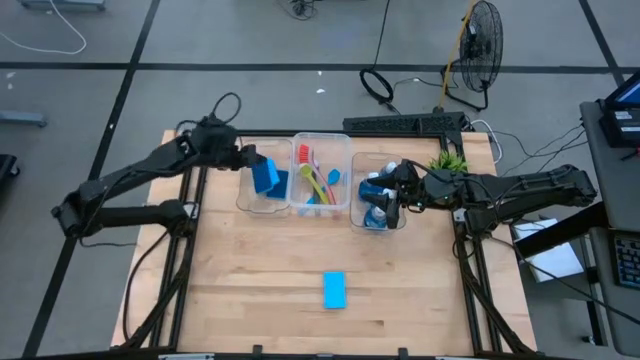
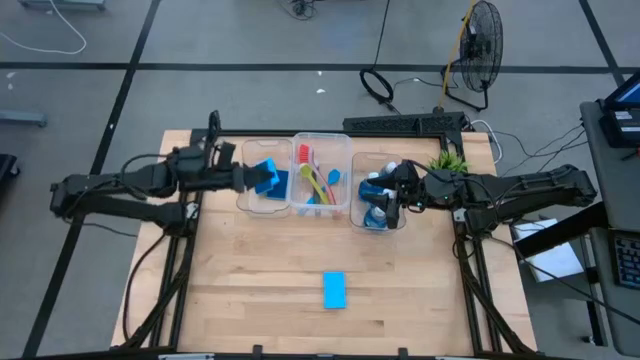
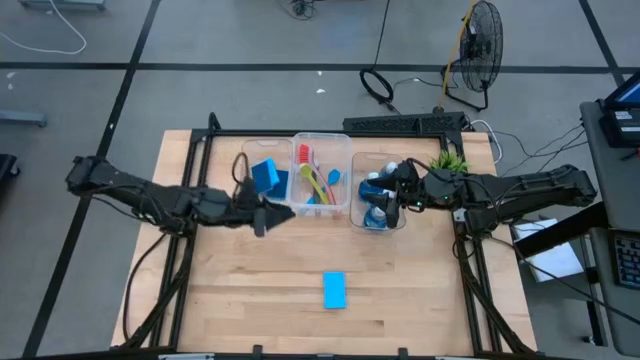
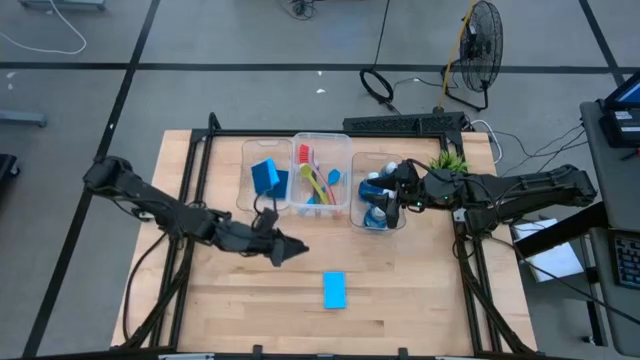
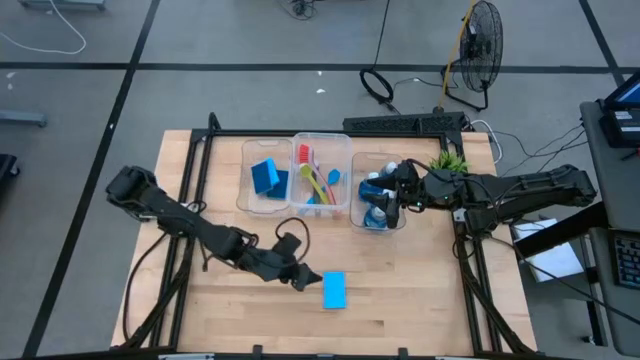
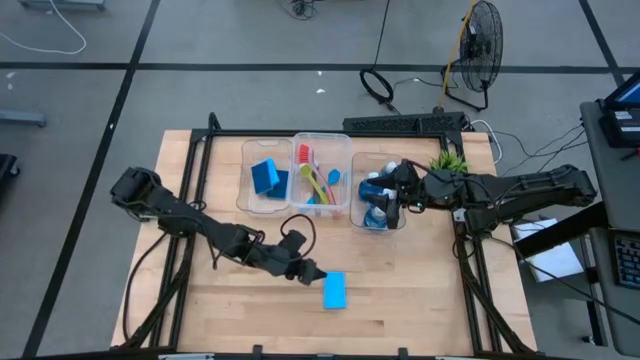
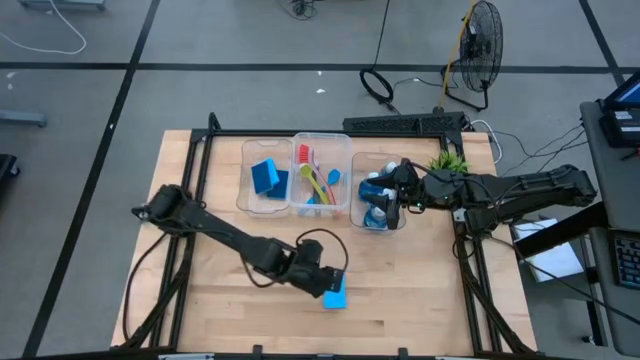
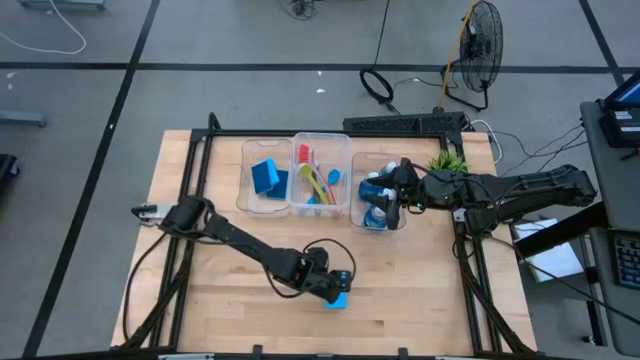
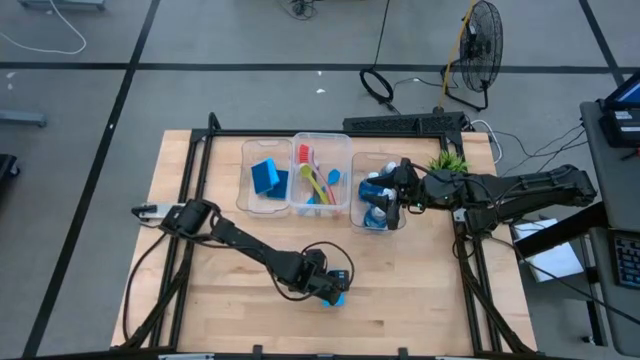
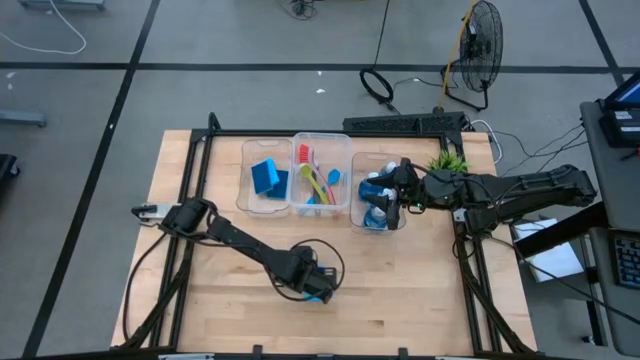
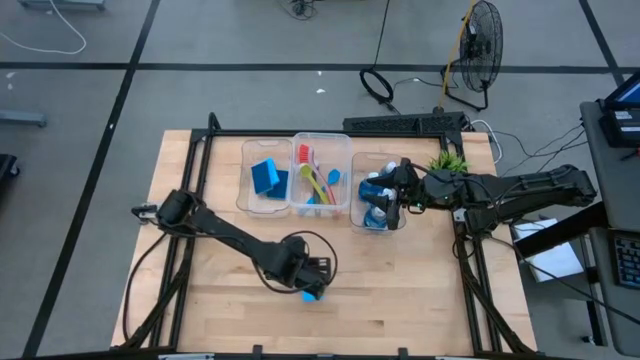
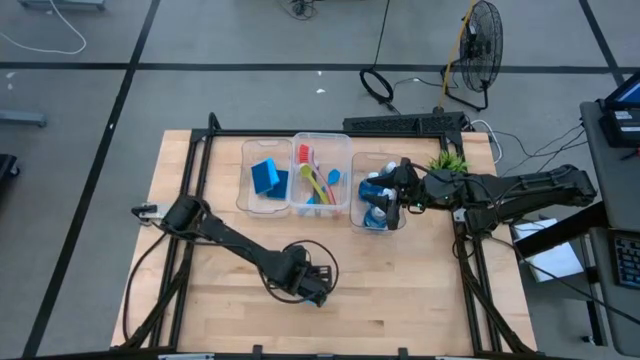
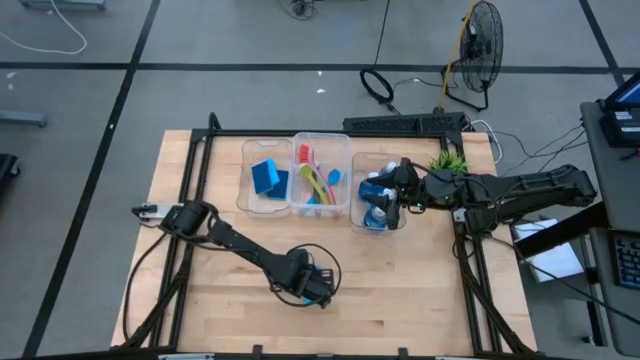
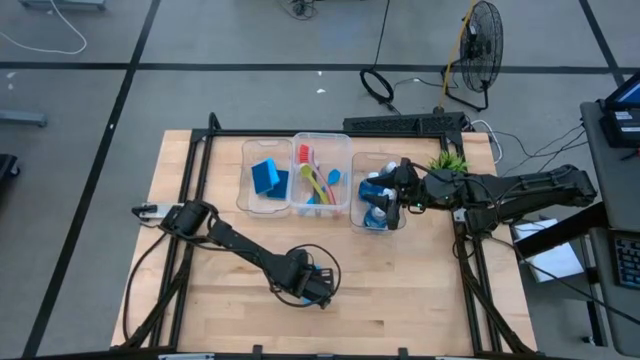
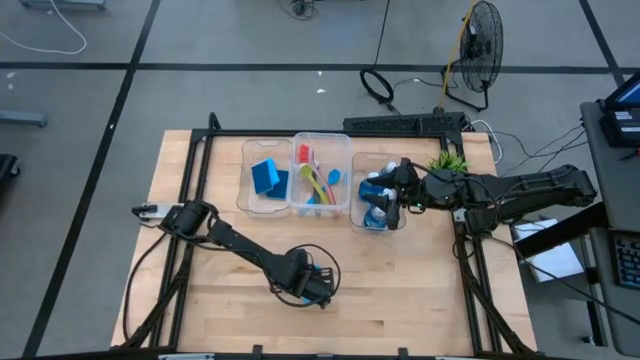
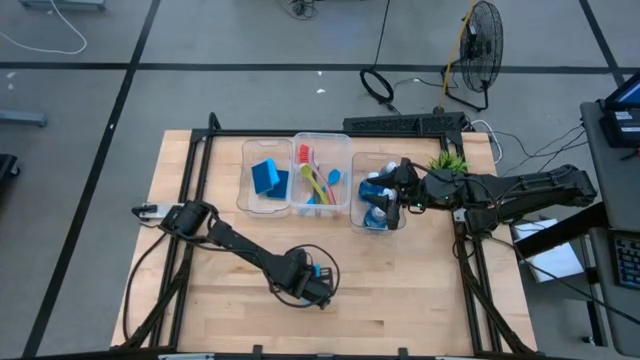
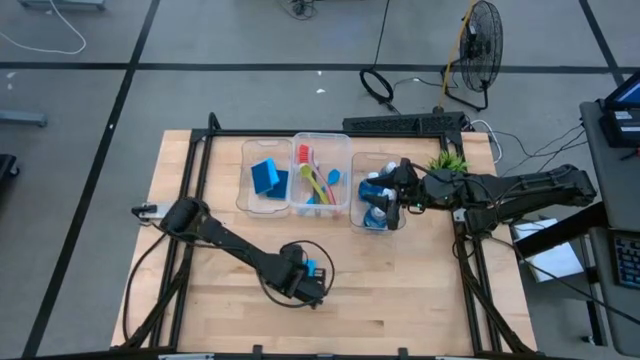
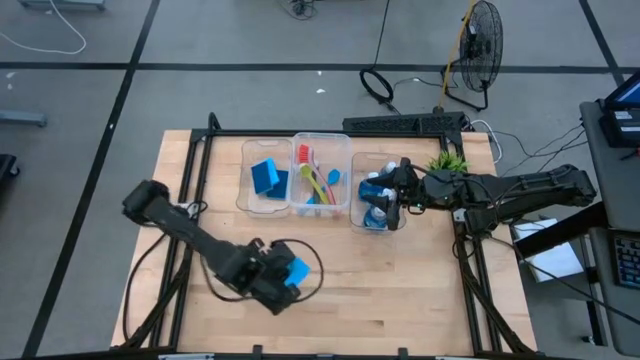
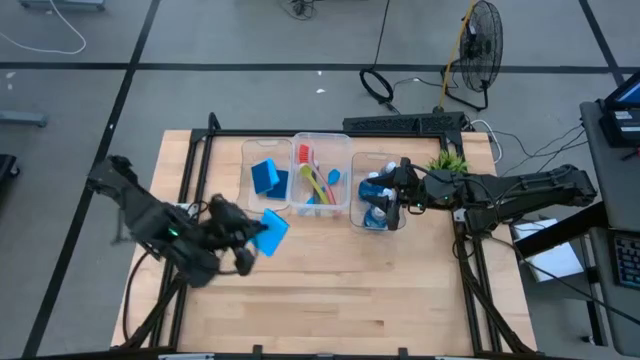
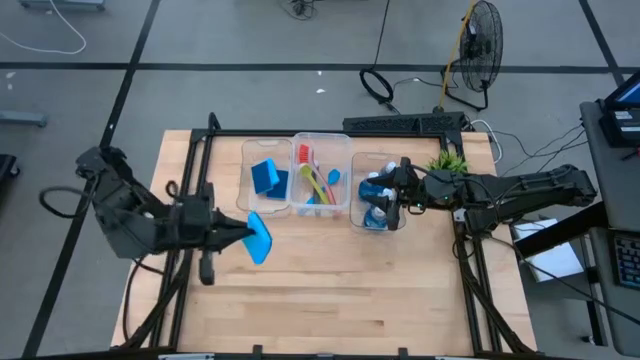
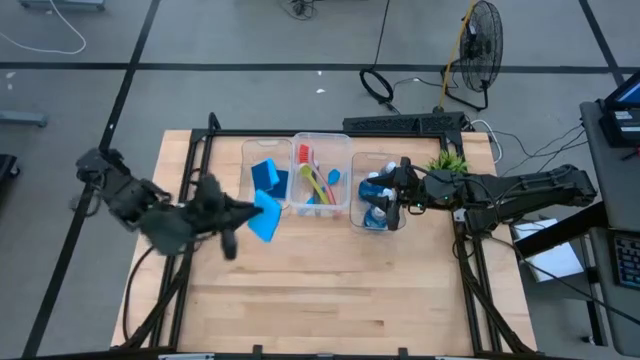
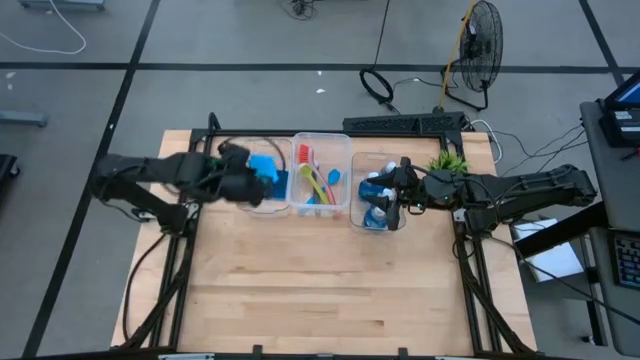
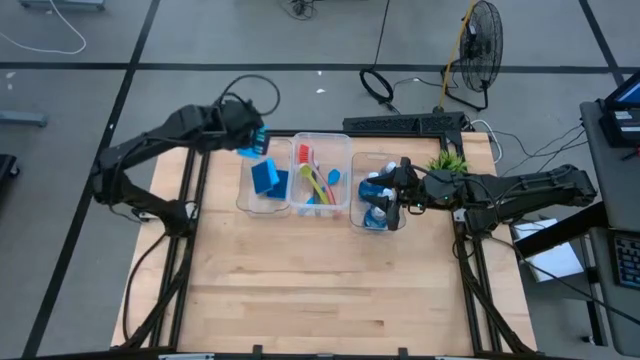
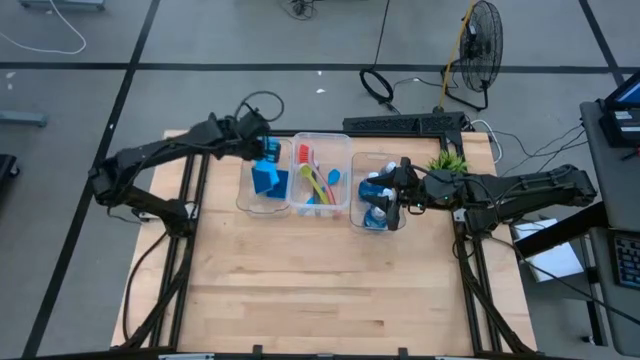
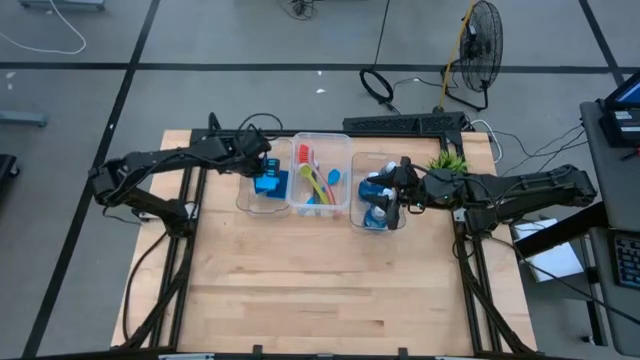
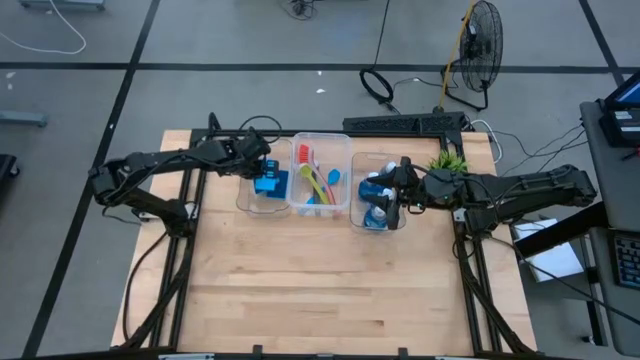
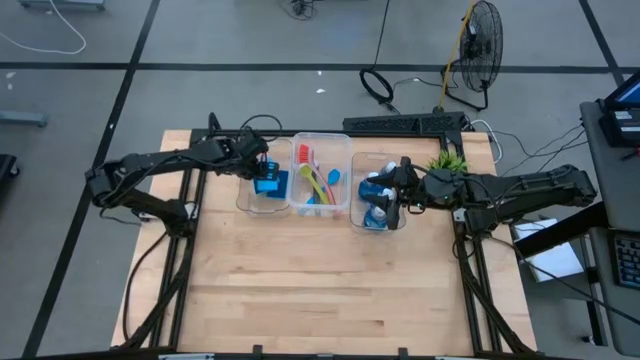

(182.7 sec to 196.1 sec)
Task: Pick & Place Kitchen Sink Supplies
Put the light blue sponge into the left transparent bin

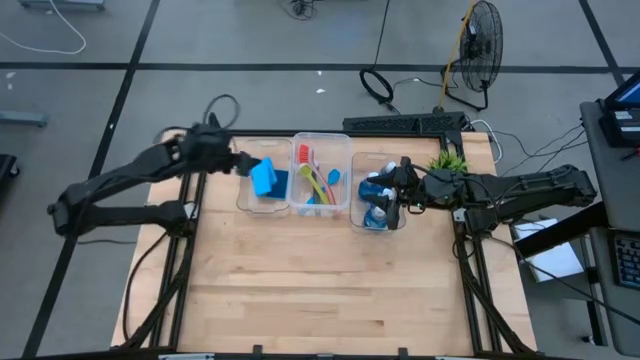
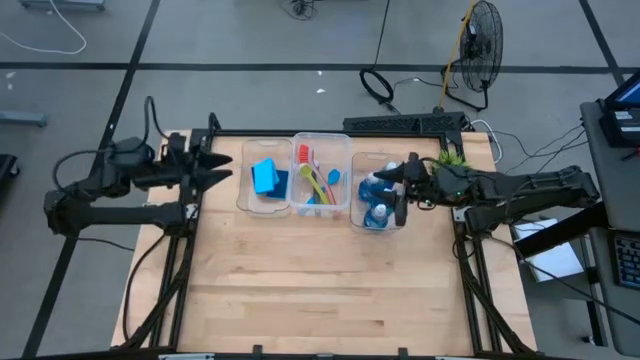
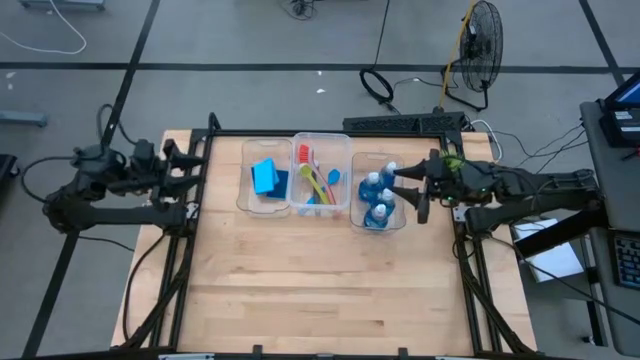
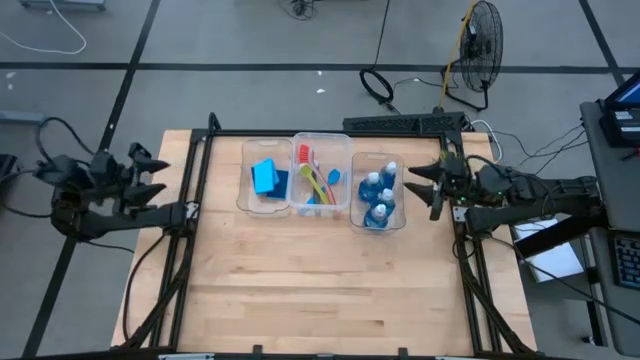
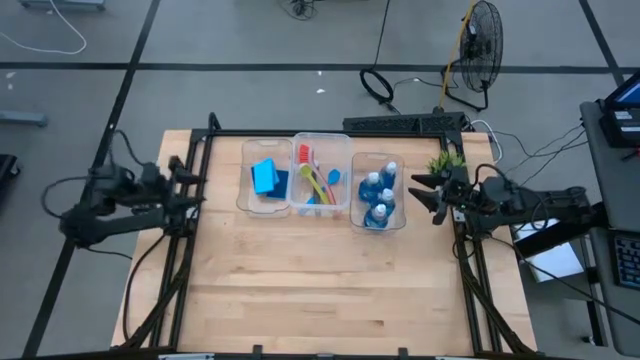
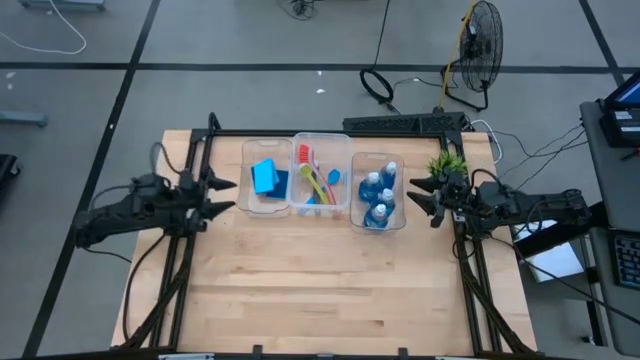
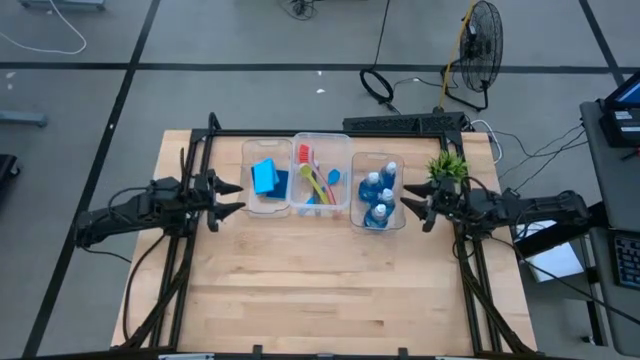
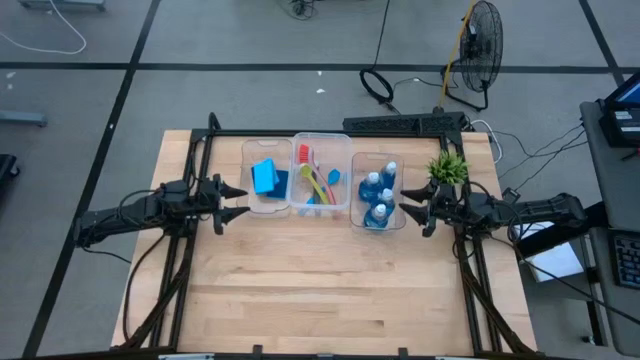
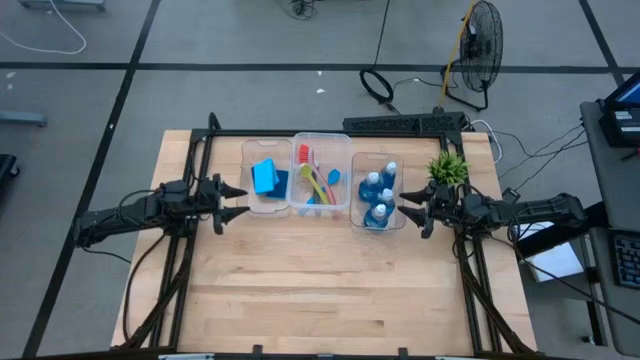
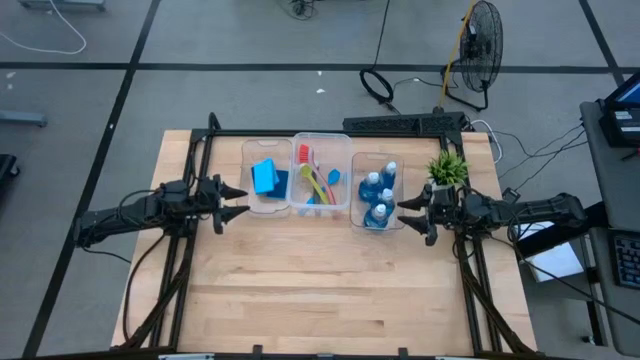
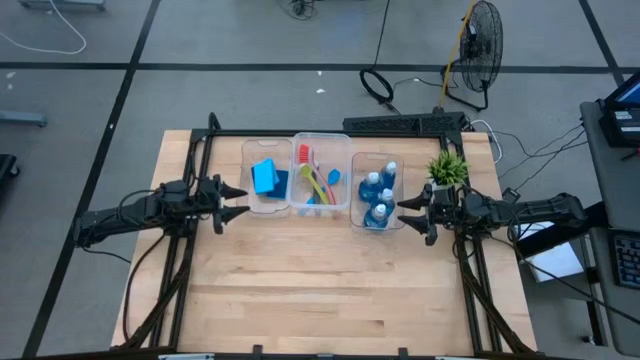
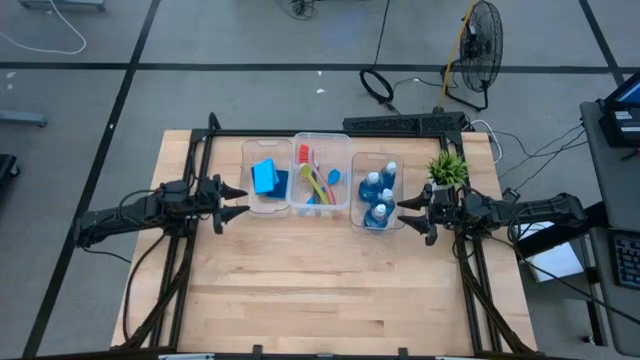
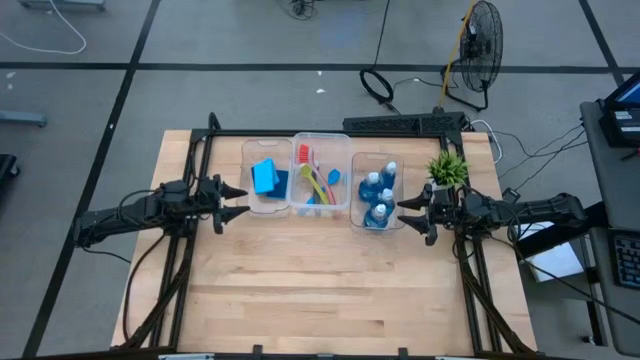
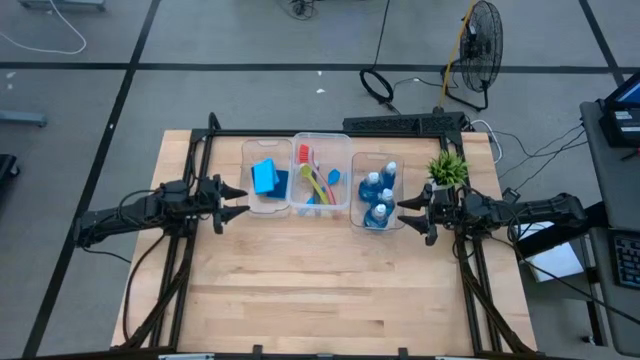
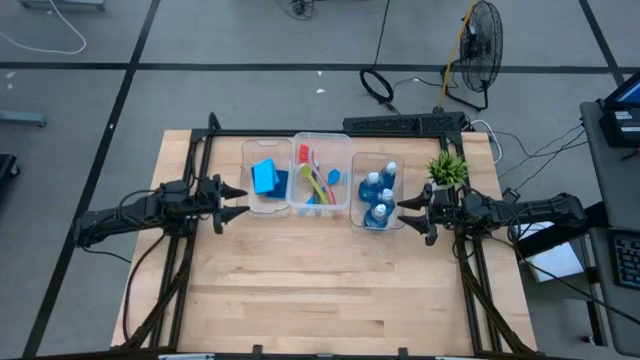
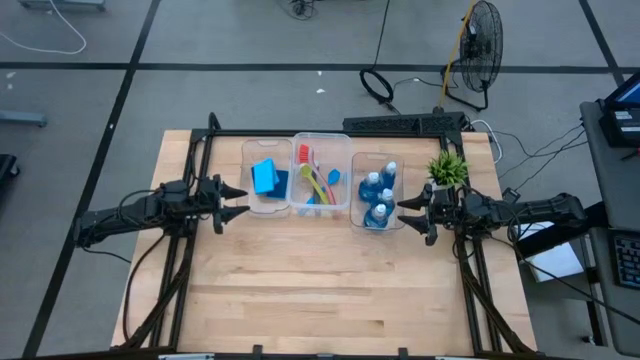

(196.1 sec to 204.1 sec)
Return to Home Position
